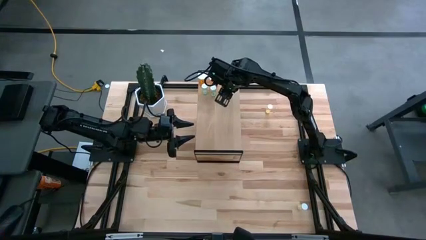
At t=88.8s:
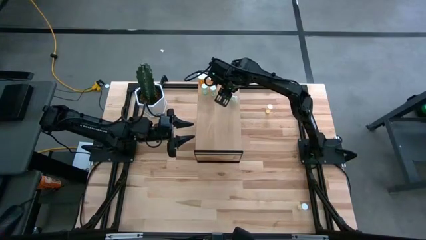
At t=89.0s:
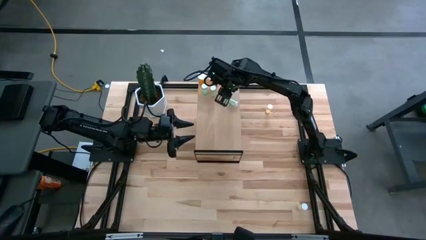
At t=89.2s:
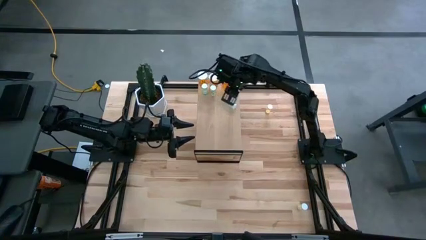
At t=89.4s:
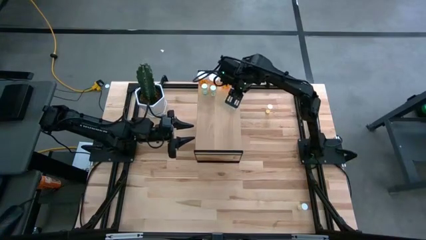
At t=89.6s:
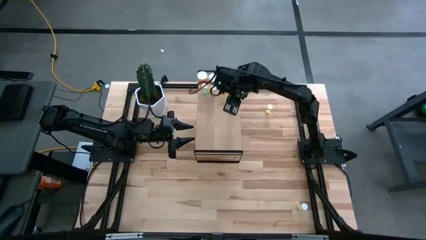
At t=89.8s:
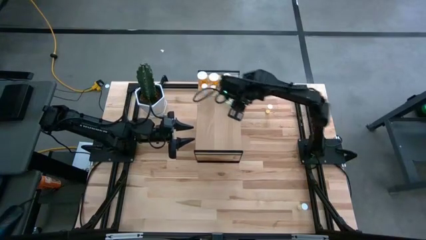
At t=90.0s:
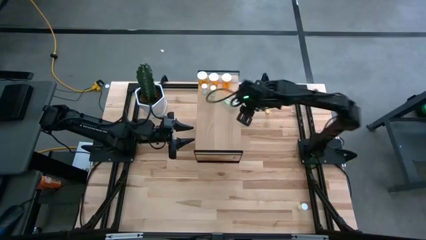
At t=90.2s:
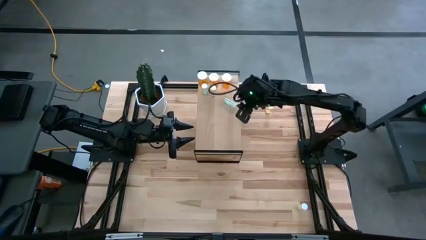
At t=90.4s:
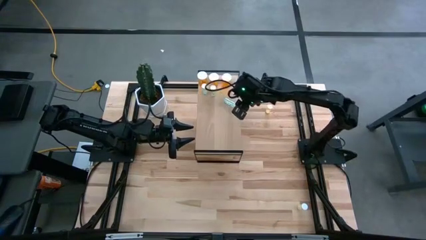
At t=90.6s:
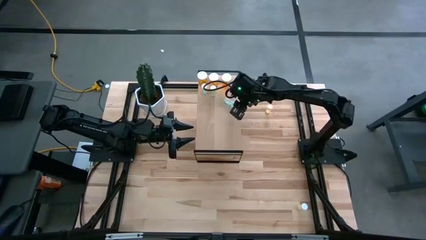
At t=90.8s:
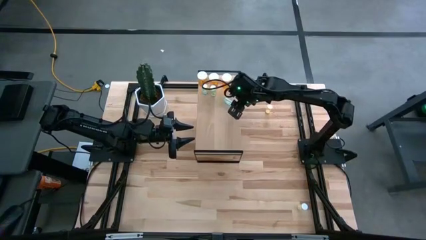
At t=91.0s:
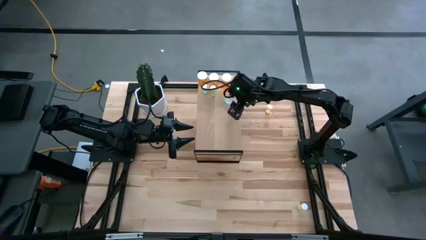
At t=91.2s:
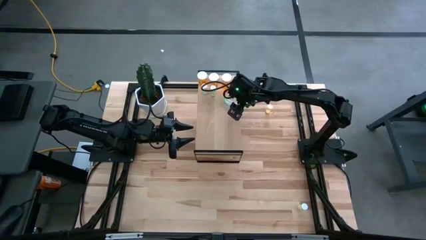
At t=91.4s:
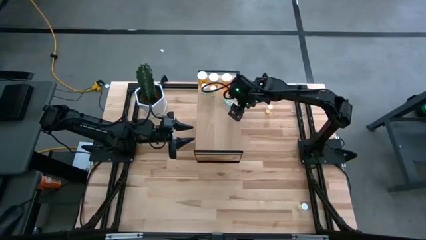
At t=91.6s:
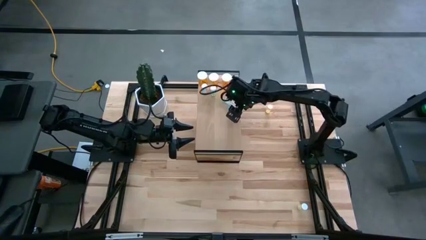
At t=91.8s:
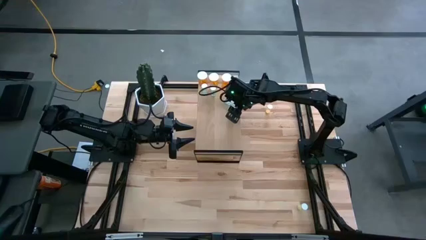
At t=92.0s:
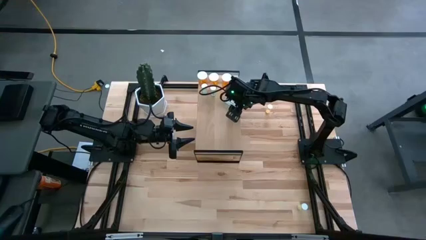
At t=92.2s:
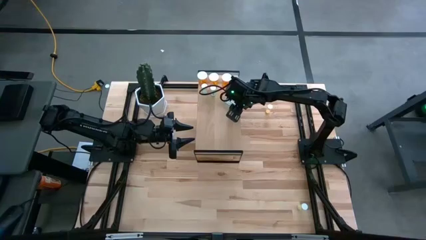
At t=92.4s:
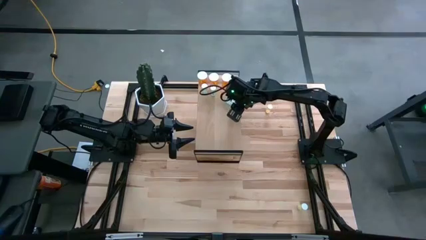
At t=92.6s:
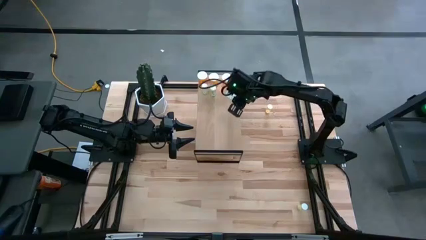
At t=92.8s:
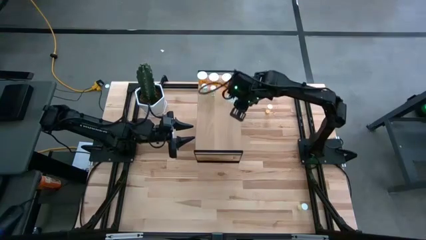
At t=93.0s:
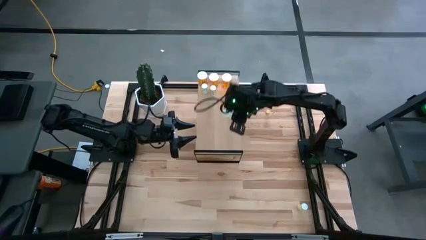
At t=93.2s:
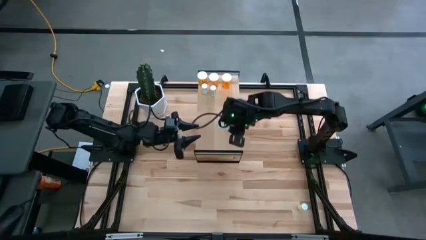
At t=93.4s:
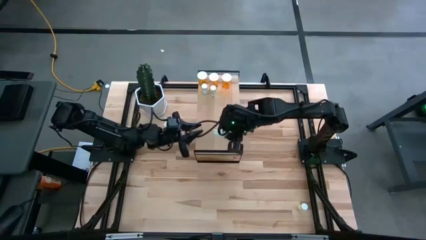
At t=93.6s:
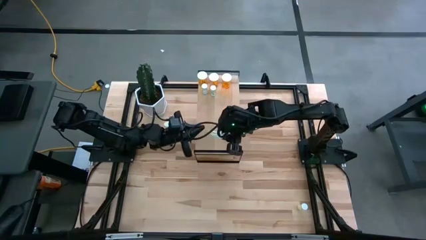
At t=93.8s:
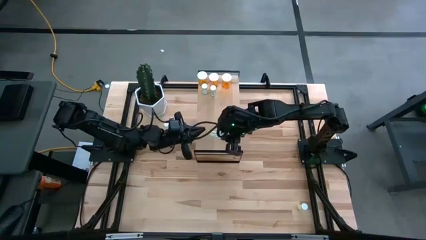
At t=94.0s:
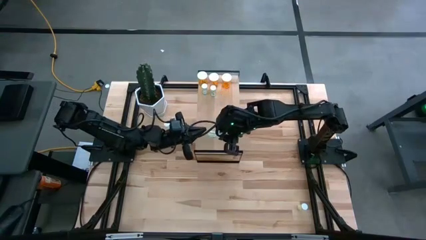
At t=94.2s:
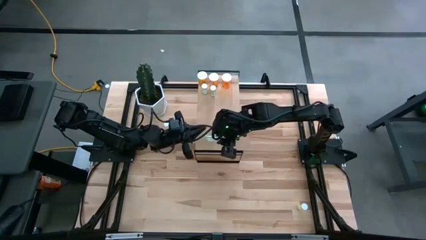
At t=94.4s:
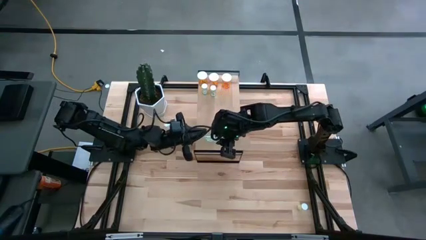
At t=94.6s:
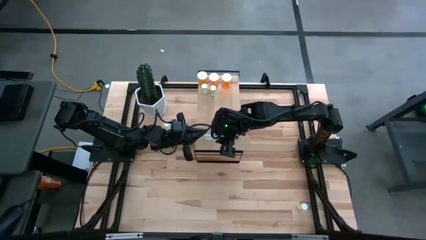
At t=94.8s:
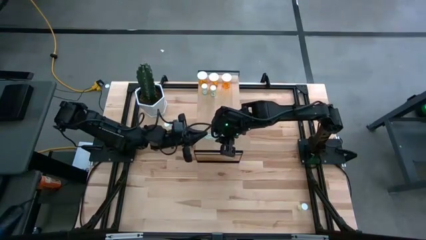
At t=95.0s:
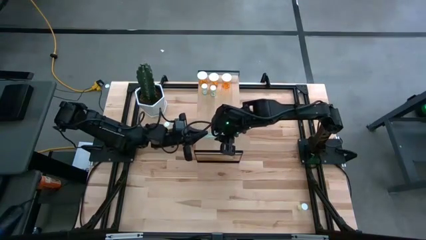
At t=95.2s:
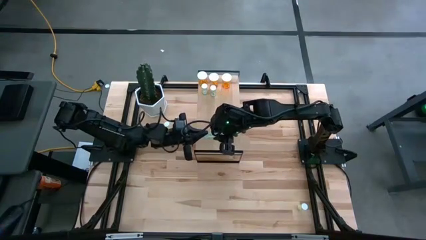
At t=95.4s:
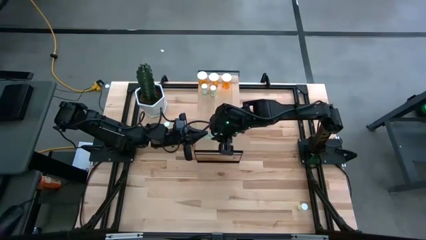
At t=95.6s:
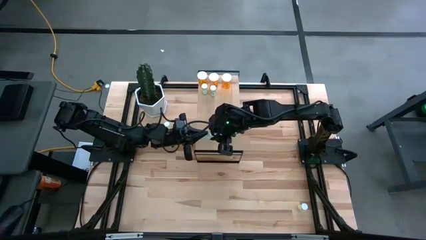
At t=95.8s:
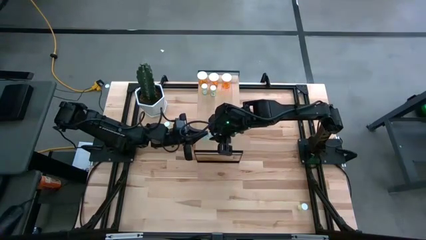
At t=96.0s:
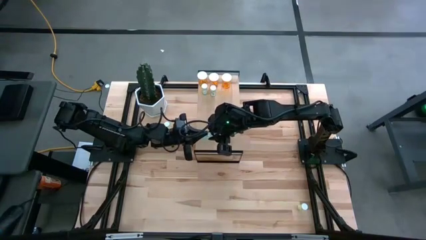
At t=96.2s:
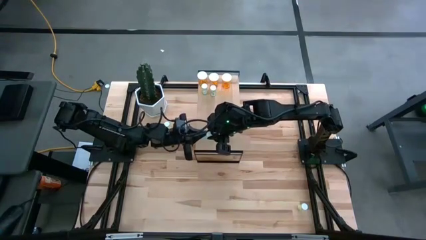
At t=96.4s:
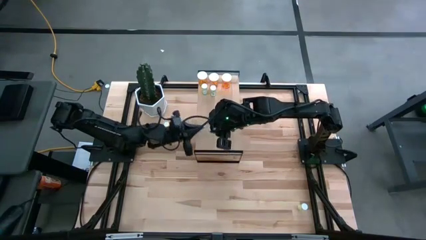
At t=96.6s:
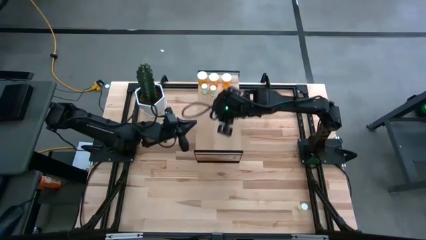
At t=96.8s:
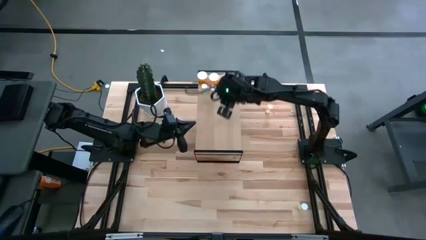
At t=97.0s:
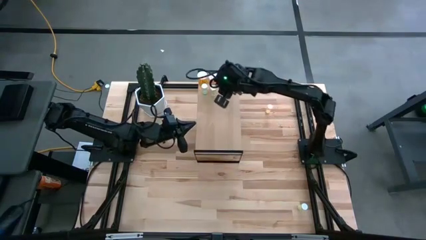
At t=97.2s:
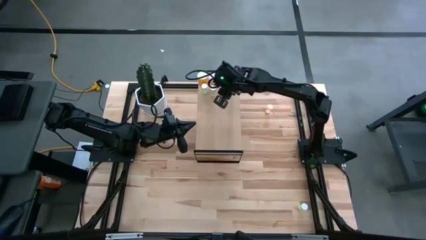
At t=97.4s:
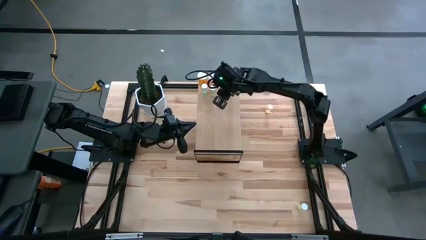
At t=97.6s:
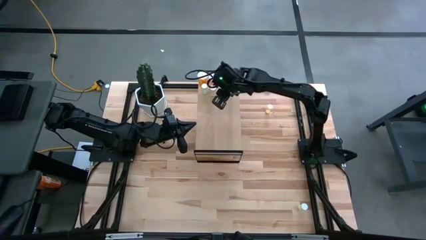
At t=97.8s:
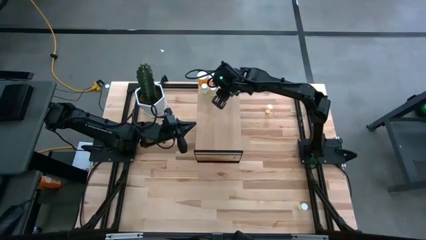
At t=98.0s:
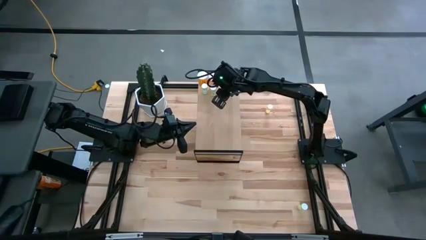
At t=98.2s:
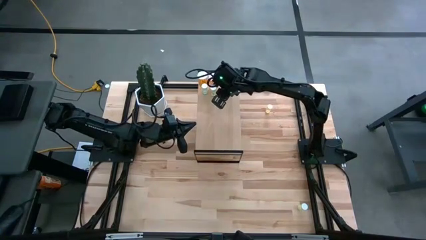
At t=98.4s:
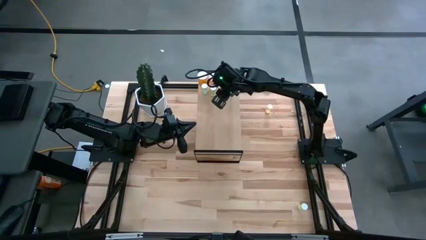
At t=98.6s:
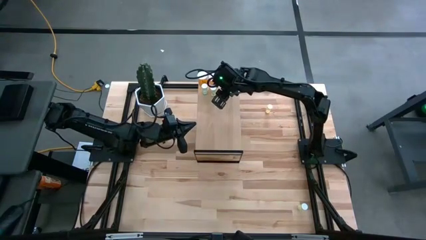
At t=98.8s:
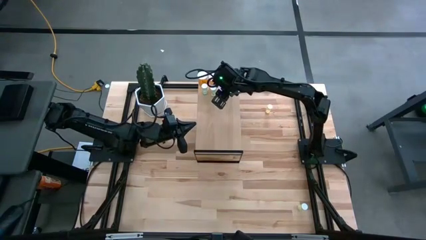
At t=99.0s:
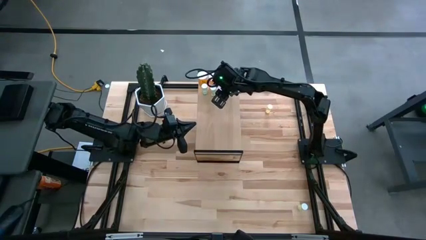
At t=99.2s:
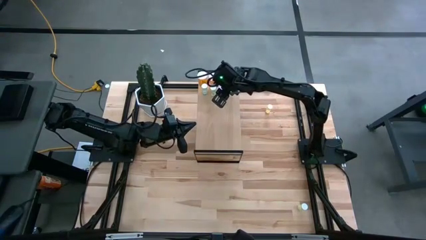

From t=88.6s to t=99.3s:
Task: Pick and place medicine bottles onto shelf by color
Put the green pill bottle on the shelf aligned with the other green pill bottles

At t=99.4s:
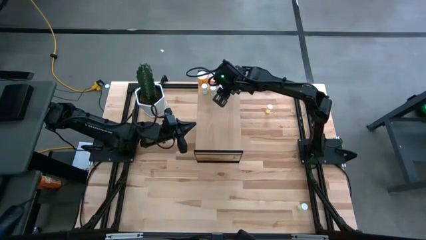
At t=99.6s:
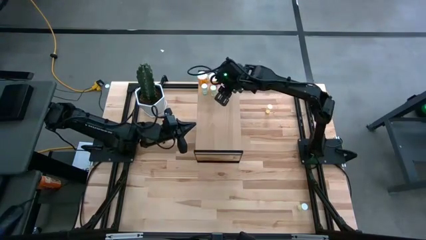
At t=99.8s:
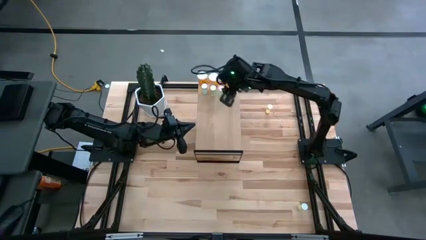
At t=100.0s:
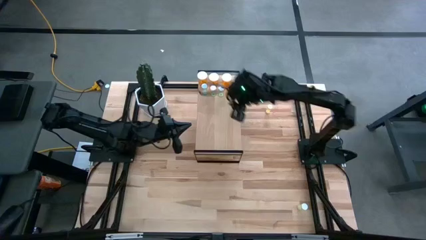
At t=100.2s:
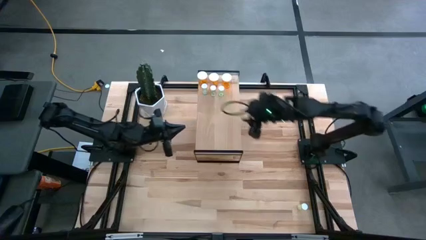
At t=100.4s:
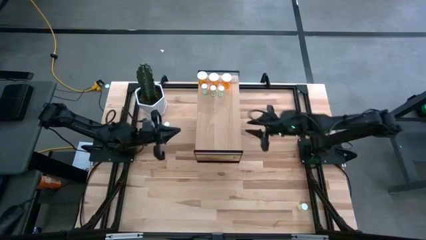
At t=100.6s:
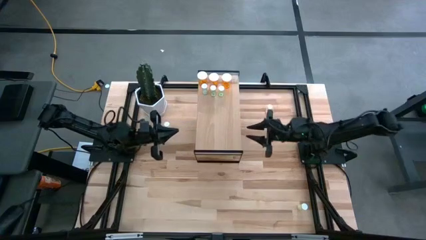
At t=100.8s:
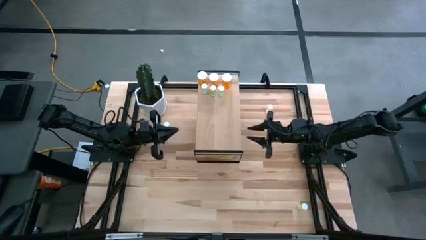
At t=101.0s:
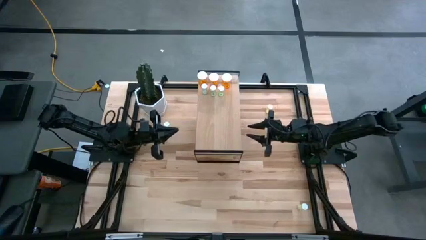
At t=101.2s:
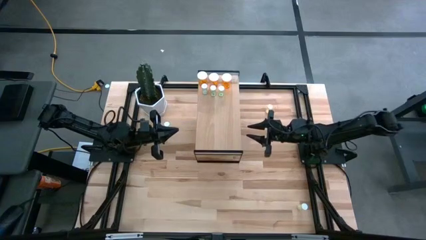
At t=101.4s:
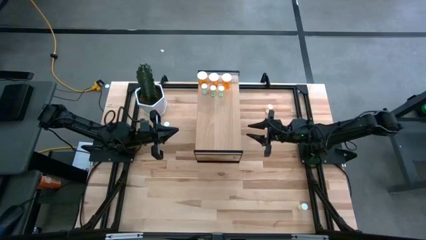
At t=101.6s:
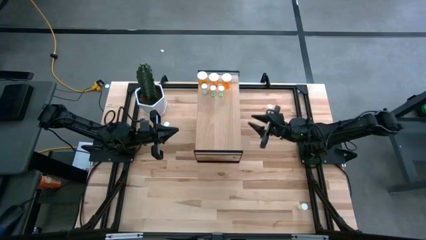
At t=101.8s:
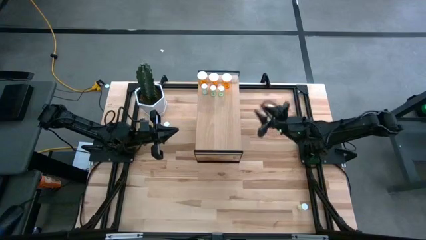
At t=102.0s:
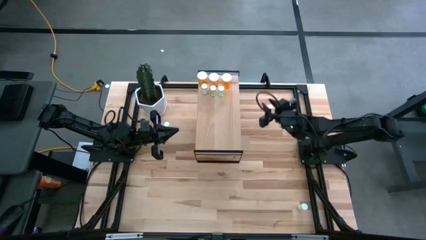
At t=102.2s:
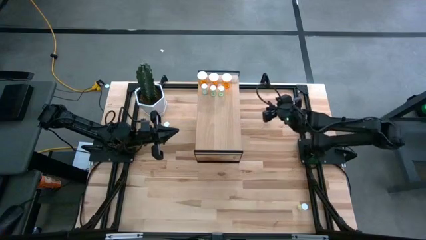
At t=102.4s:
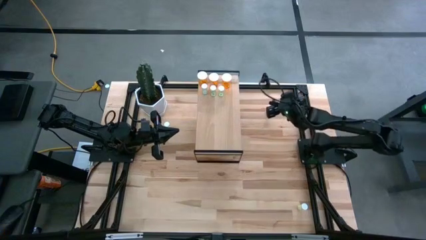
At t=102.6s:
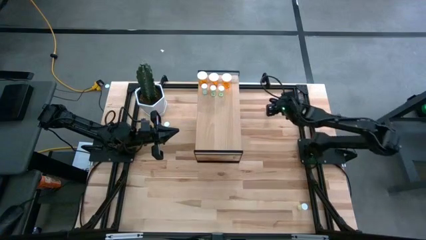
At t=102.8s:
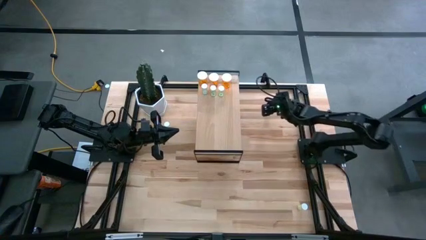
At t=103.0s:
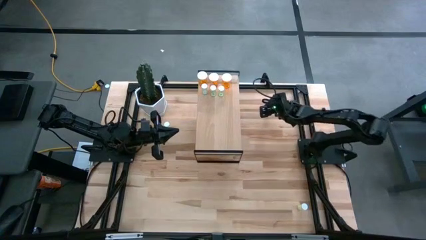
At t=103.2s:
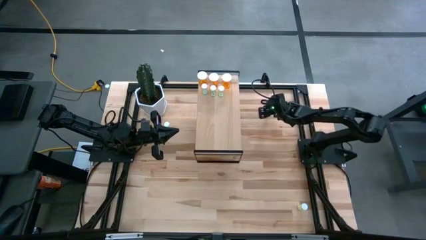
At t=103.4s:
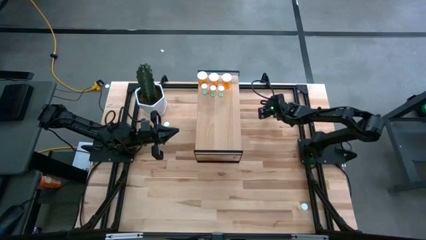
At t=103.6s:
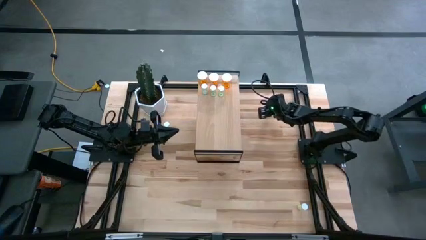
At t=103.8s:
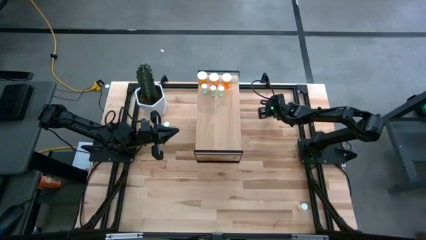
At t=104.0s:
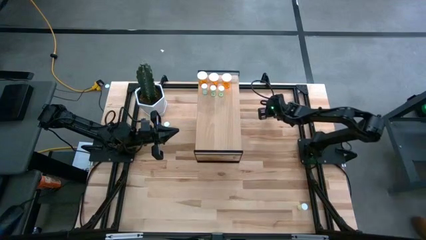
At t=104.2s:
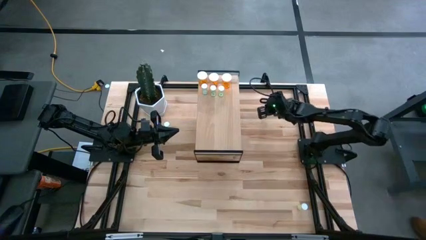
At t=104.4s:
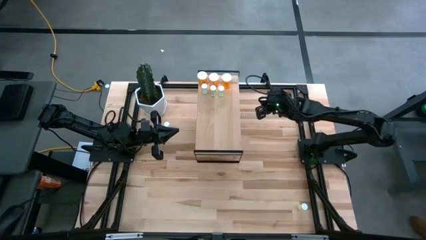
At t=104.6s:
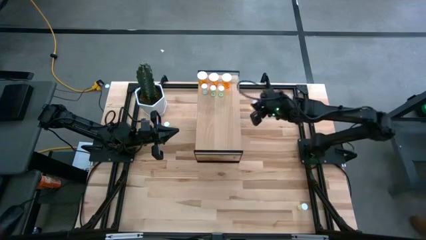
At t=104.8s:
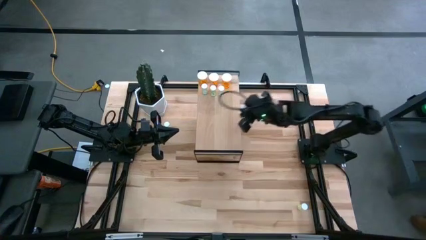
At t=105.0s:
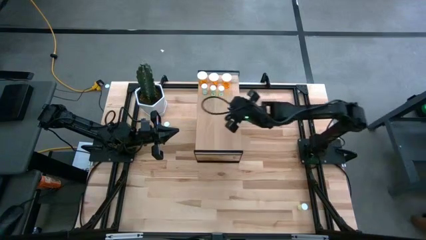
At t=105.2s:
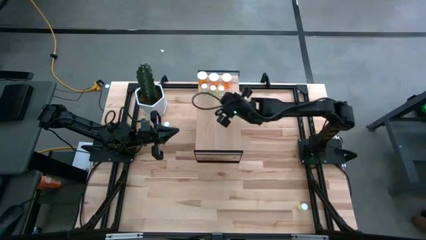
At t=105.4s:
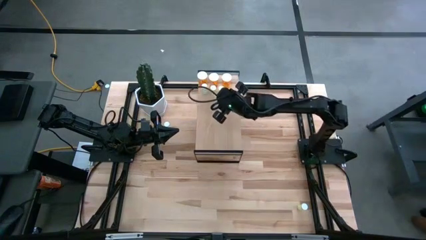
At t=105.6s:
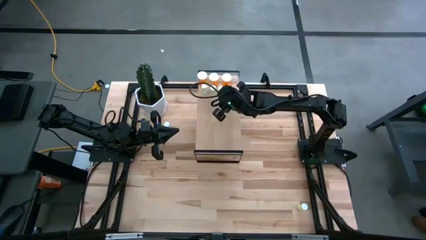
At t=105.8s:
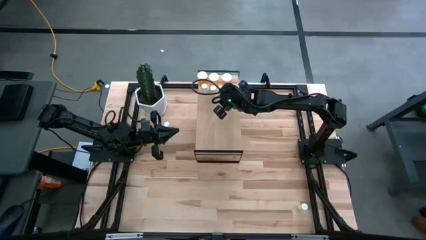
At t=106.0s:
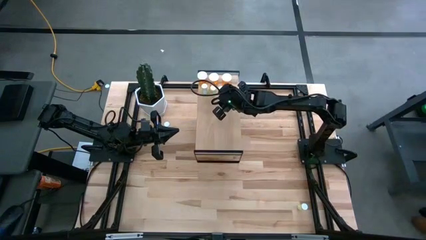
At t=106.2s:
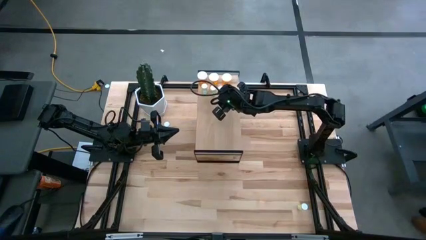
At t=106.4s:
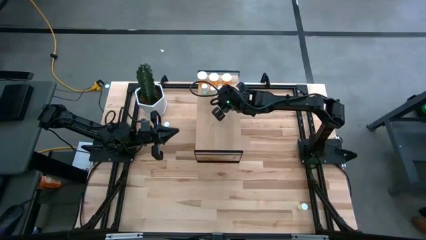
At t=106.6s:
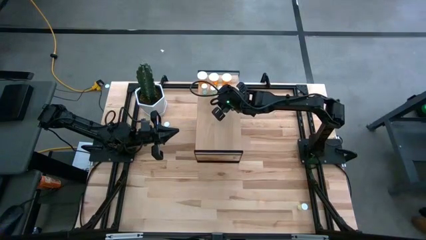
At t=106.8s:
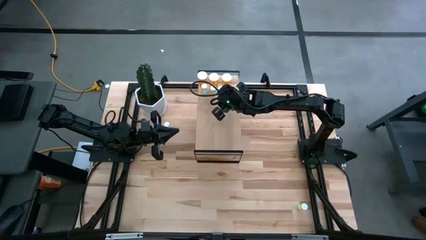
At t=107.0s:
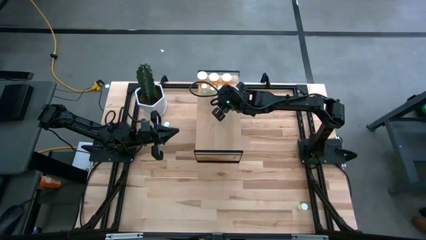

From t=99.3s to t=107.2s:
Put the top yellow pill bottle on the shelf
